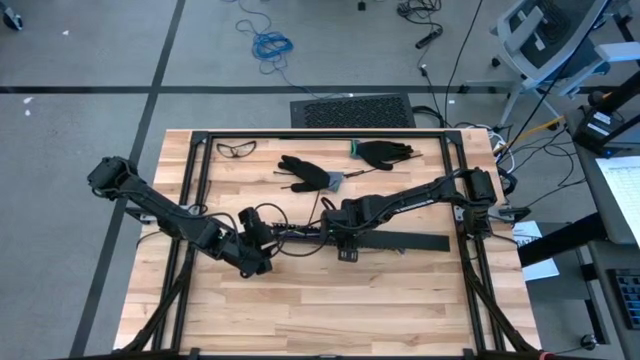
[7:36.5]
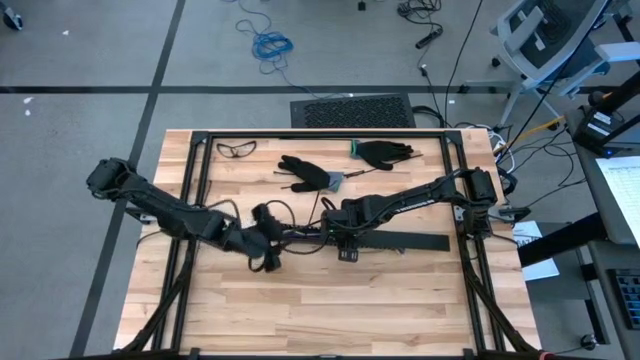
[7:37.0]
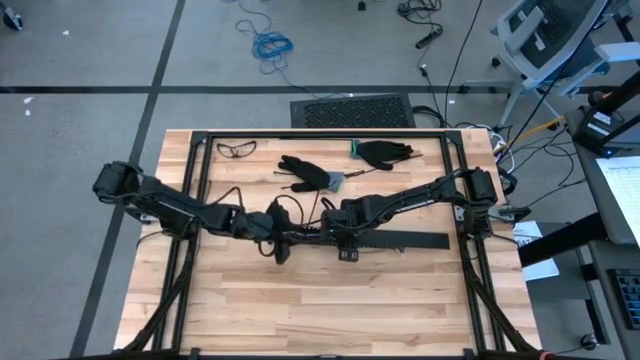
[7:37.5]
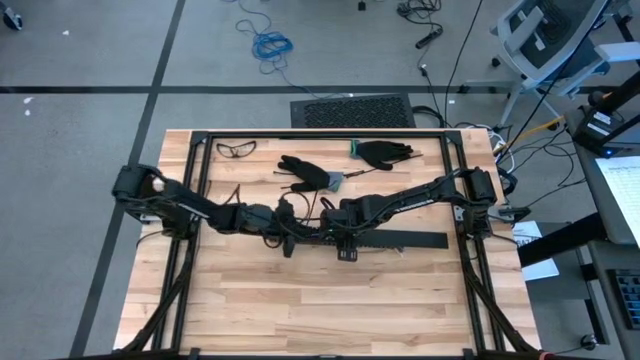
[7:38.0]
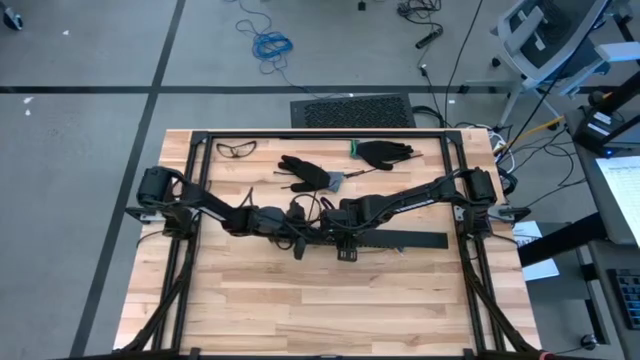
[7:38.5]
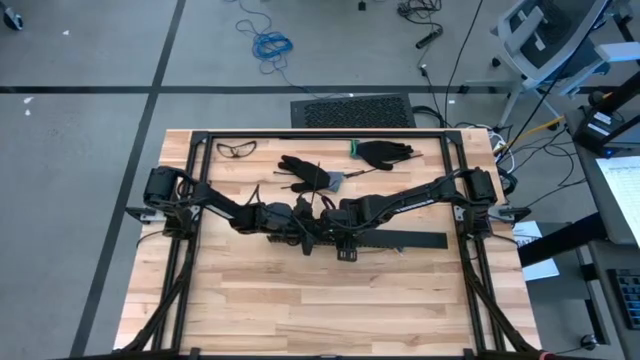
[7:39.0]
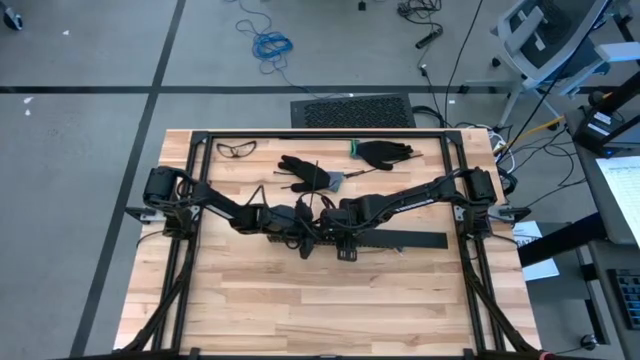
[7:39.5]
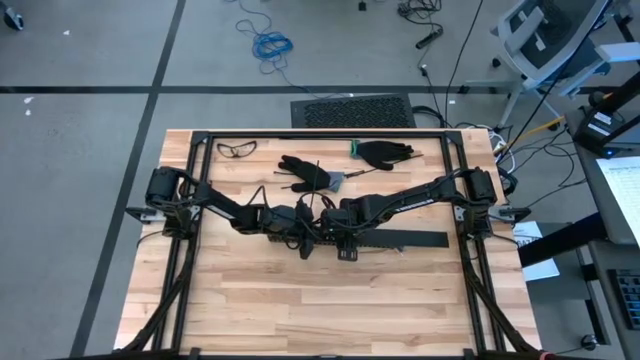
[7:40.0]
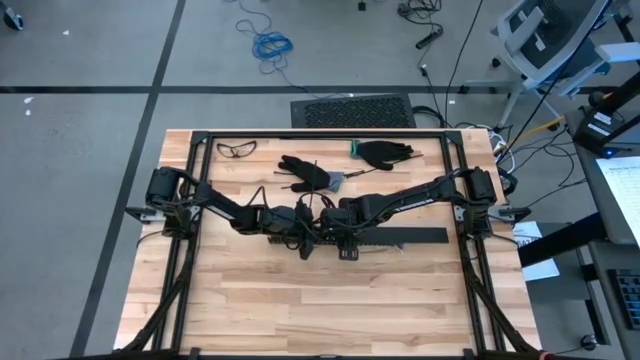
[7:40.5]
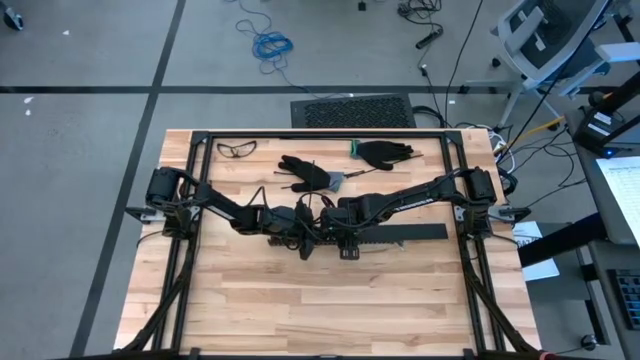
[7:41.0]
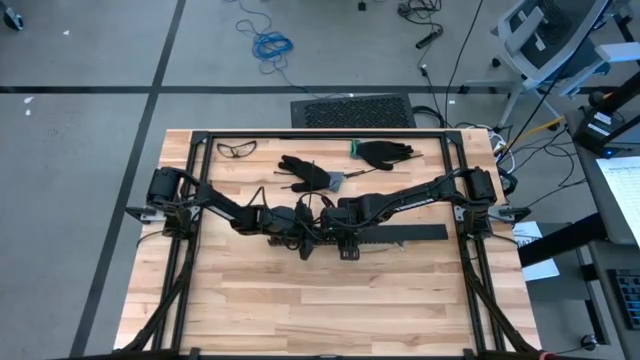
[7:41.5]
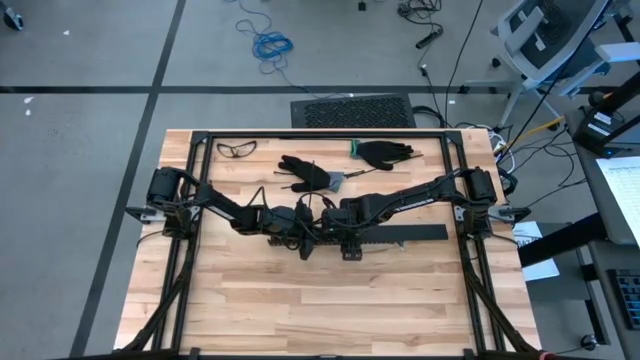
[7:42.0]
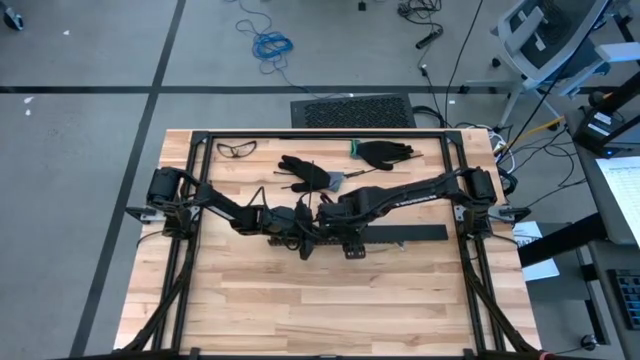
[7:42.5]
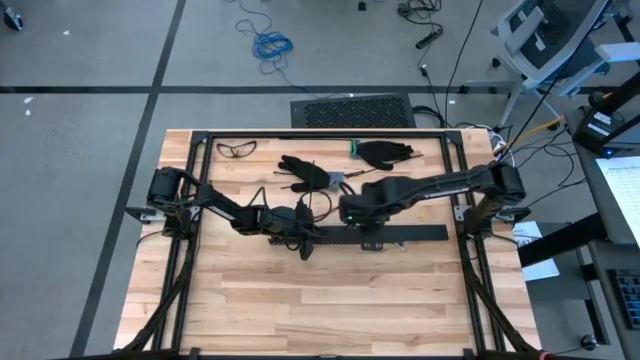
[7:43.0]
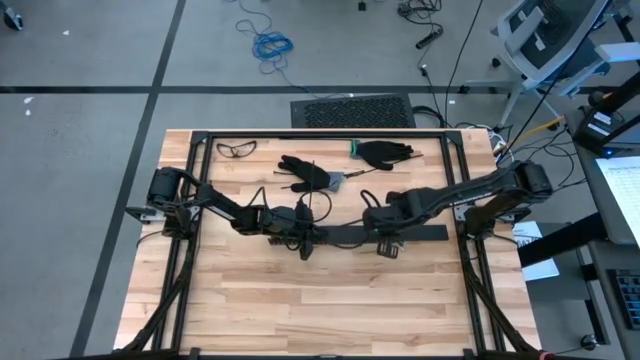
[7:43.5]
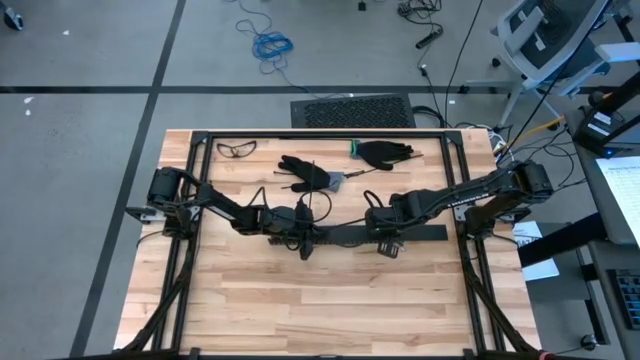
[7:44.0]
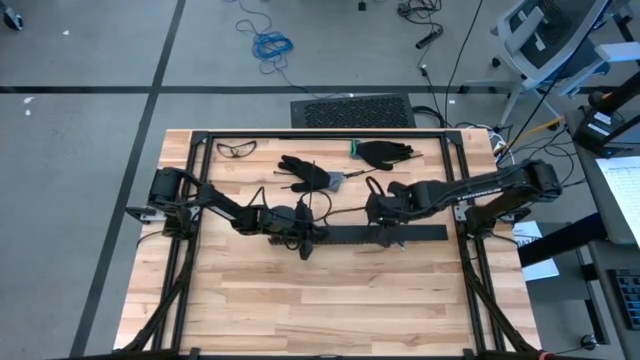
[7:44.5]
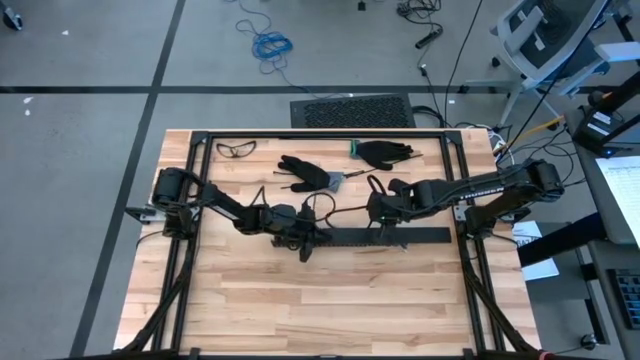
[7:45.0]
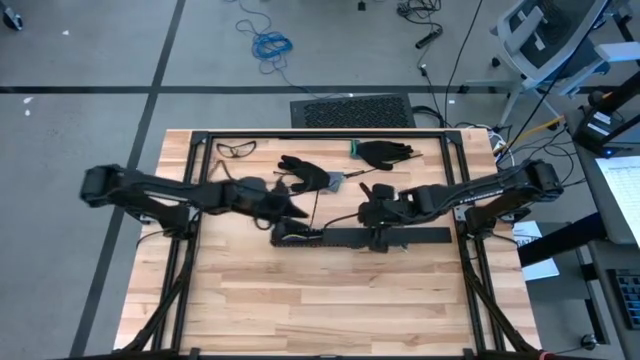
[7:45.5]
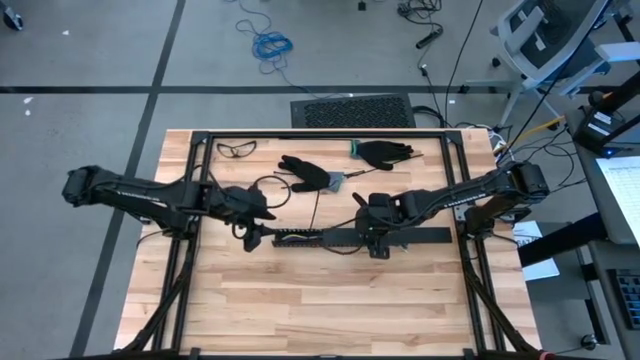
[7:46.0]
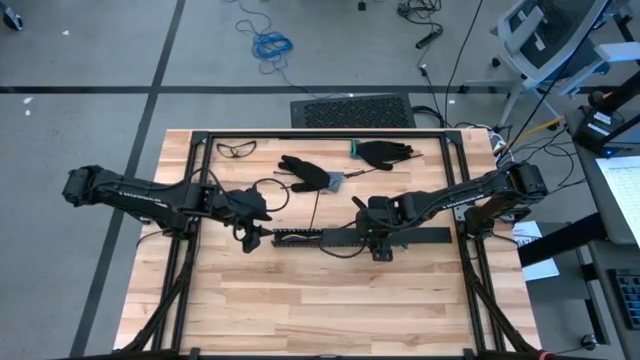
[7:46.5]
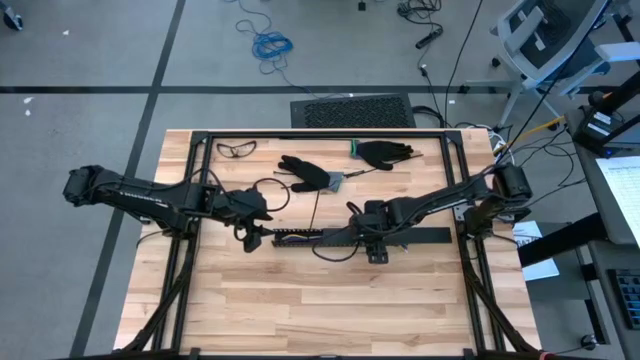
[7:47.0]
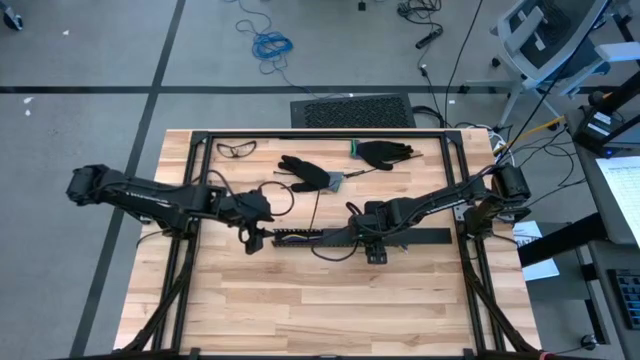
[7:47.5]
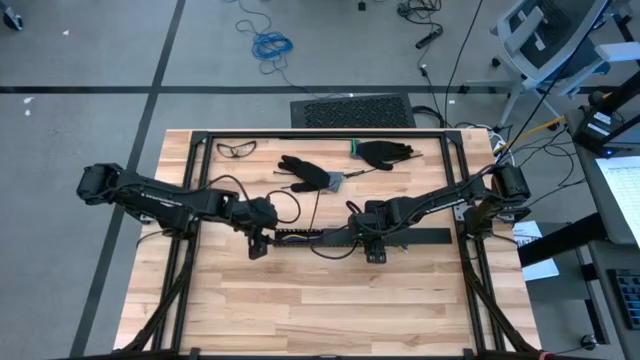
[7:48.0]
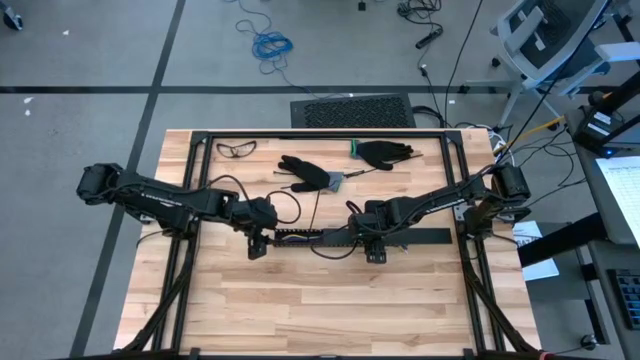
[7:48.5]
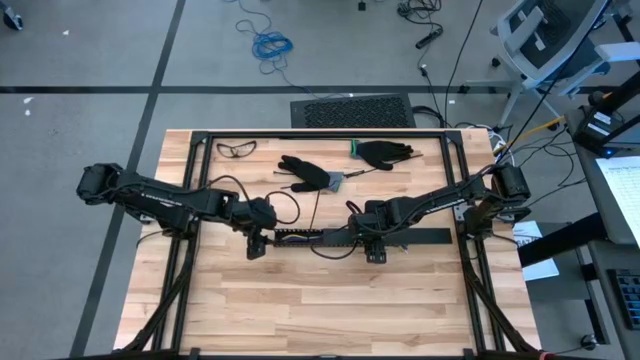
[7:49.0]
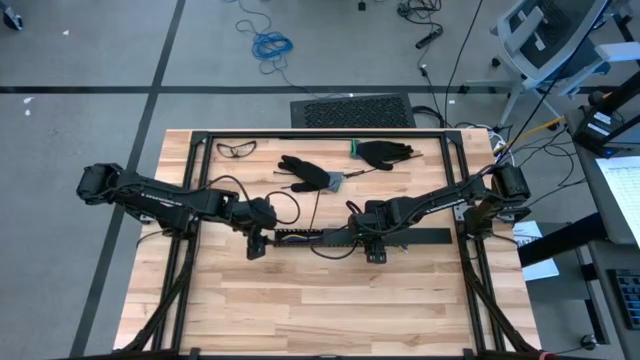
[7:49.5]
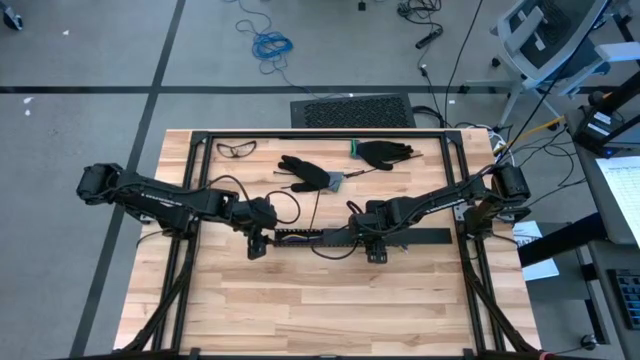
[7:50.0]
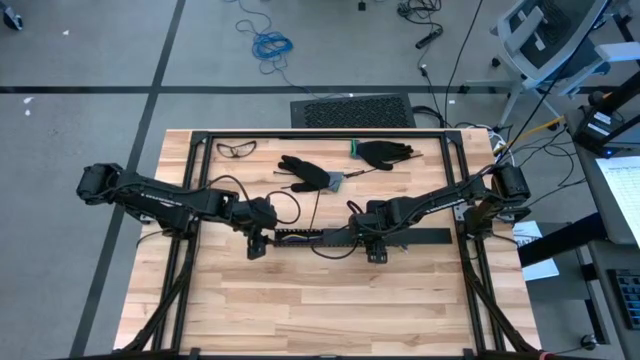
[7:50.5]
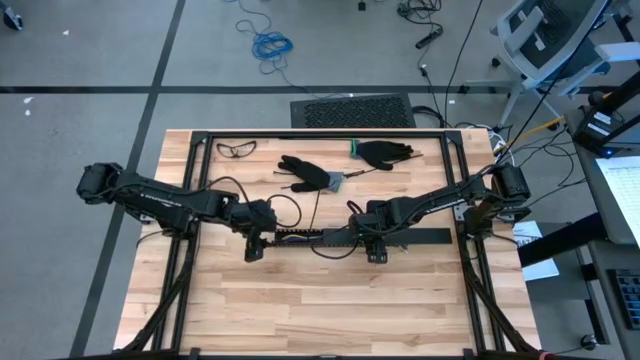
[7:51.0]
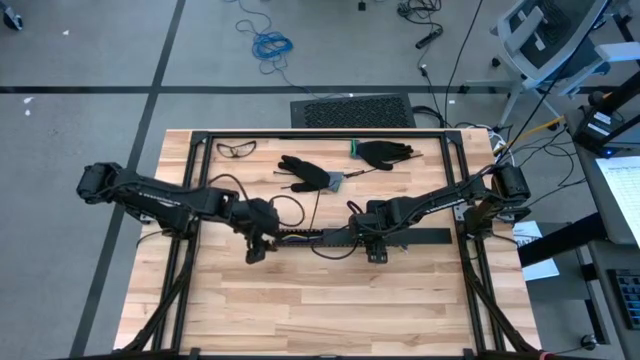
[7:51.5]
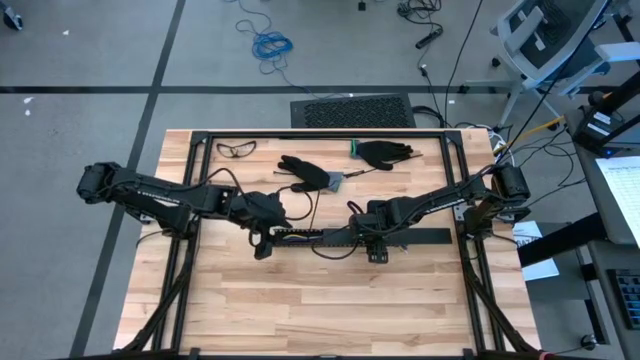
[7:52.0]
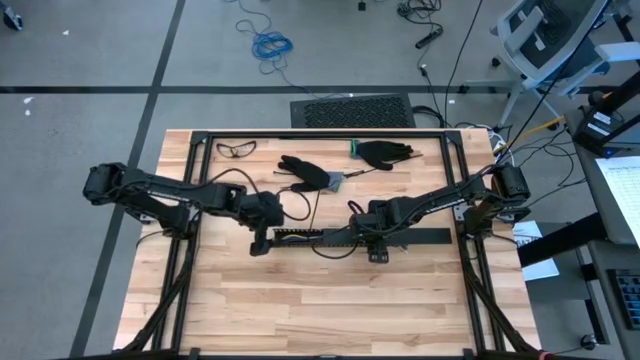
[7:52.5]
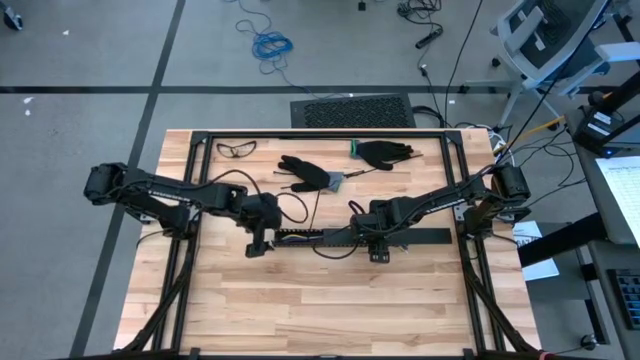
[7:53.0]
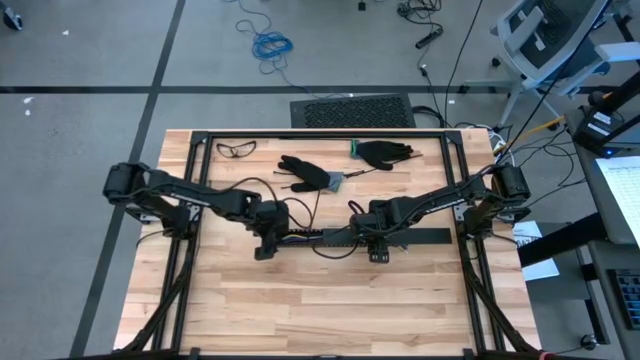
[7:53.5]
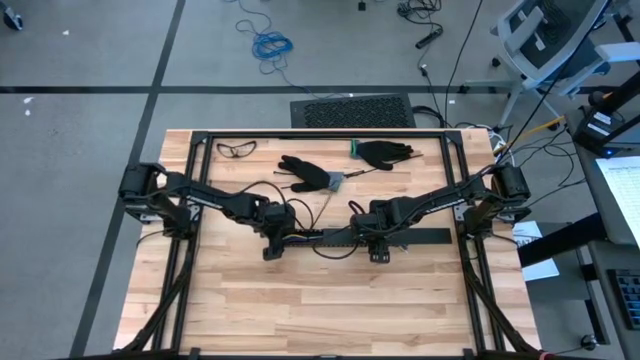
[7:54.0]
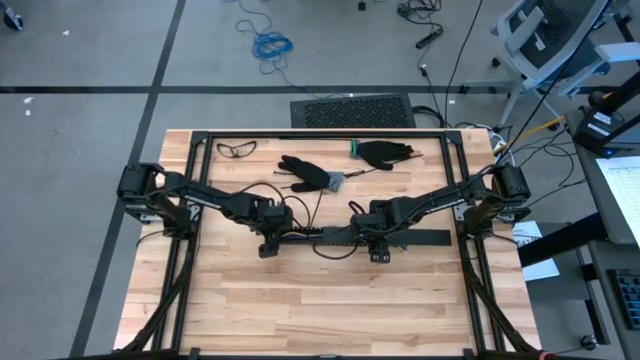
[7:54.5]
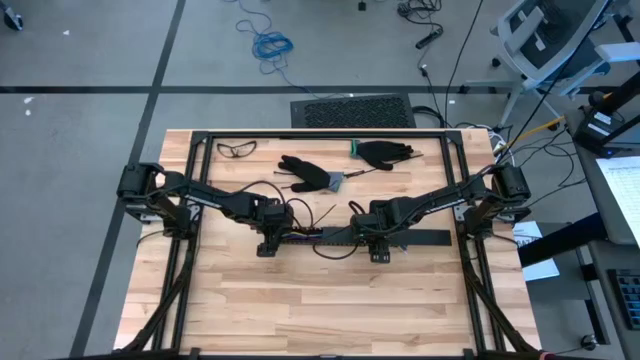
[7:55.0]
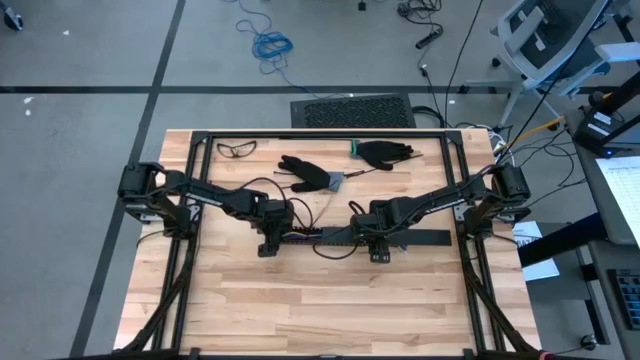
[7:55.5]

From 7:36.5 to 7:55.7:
Task: Ziptie cables
Insert the black cover of the black cable duct

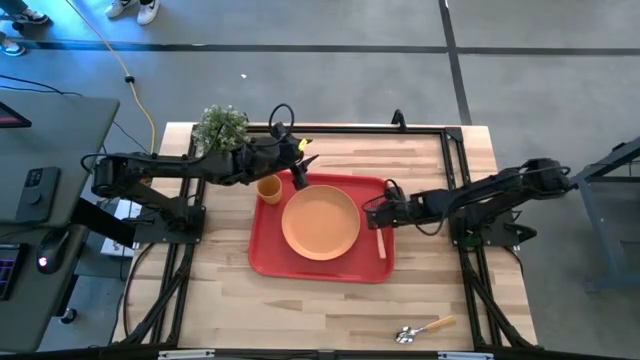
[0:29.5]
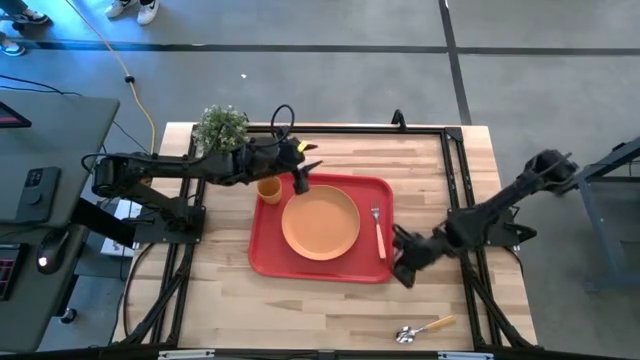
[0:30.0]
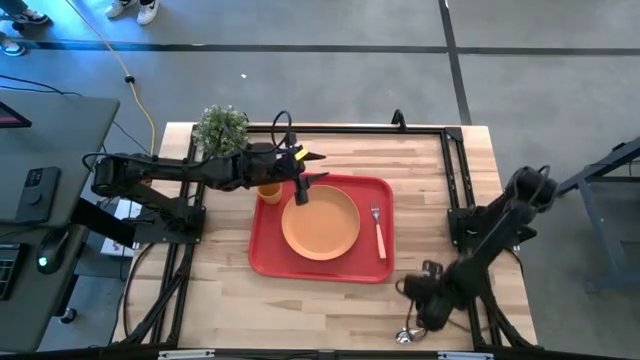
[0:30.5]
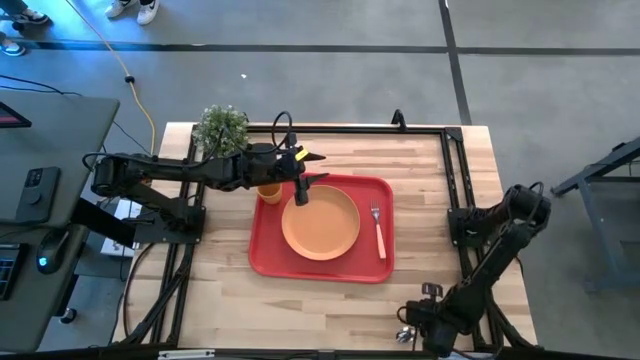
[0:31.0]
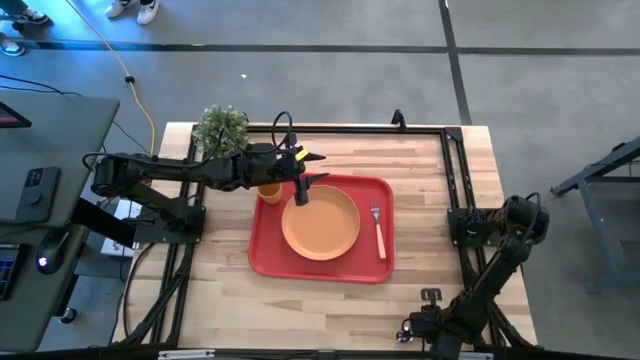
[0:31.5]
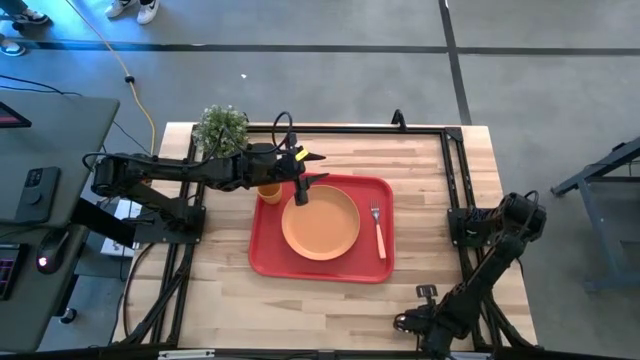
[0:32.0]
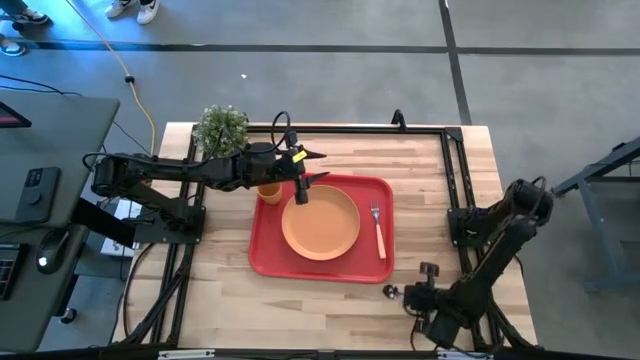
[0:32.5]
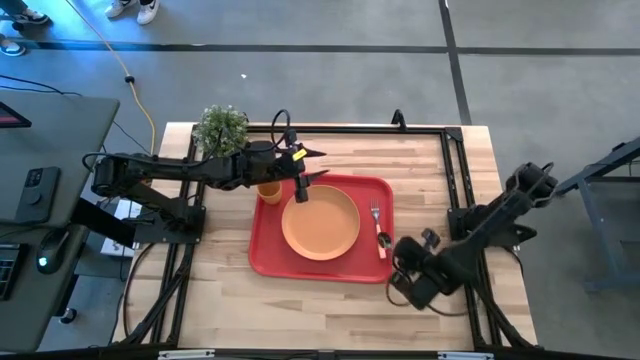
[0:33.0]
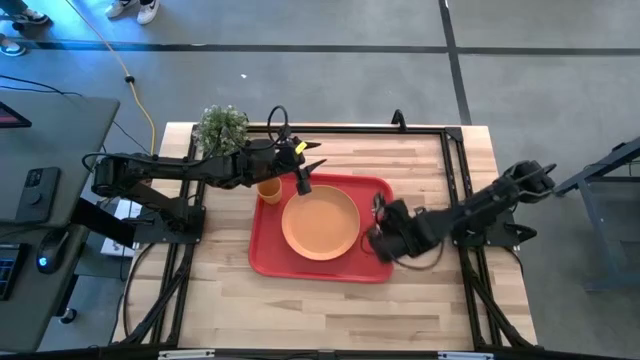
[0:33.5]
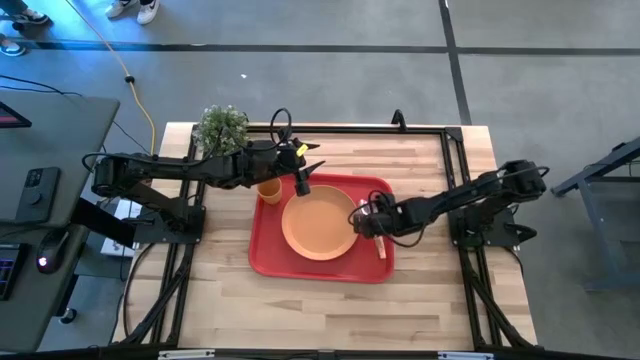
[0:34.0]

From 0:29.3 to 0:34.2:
Task: Pick and place plate/cup/fork/spoon on tray
Put the orange spoon on the red table tray to the left of the orange fork
